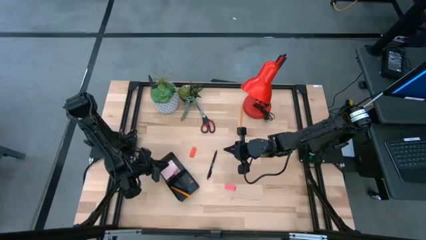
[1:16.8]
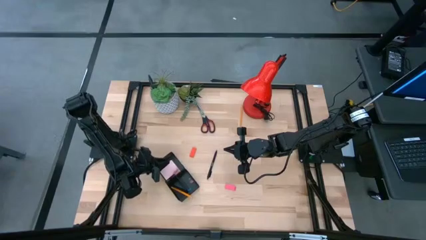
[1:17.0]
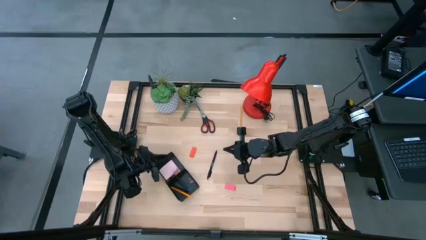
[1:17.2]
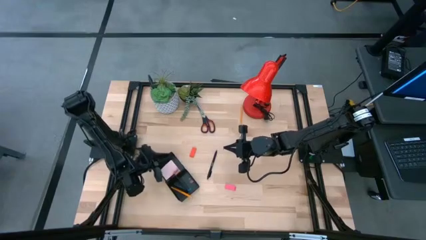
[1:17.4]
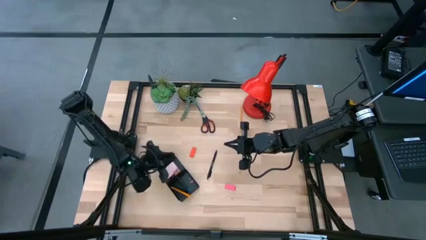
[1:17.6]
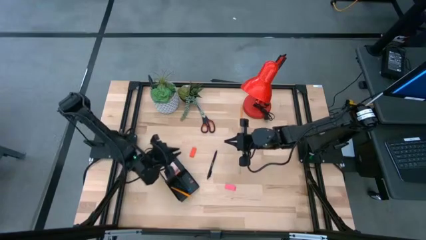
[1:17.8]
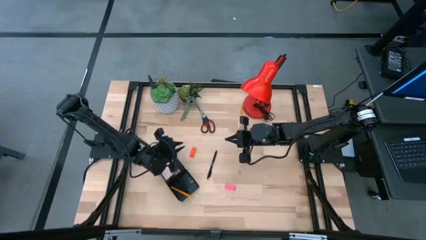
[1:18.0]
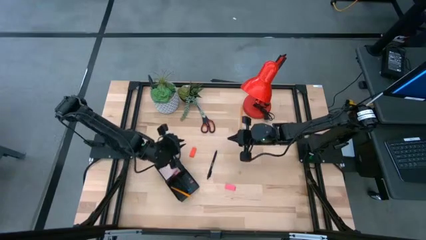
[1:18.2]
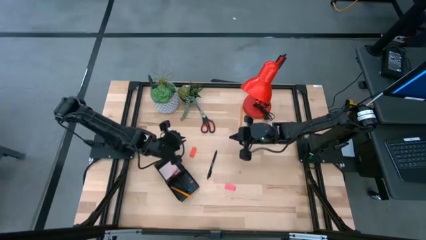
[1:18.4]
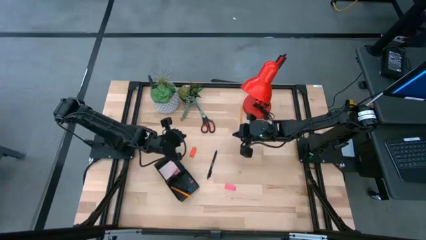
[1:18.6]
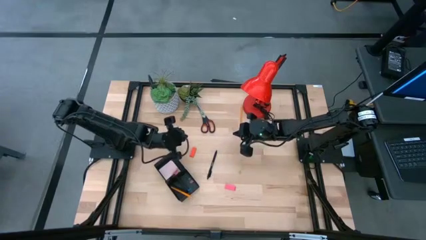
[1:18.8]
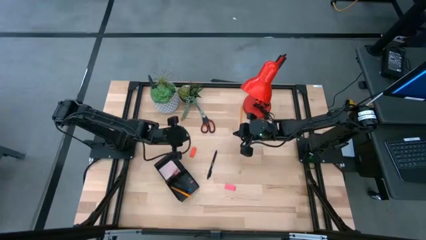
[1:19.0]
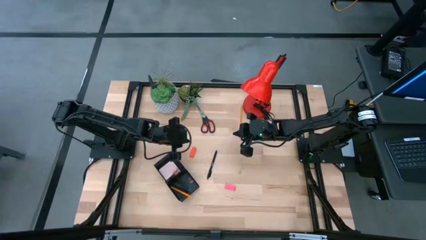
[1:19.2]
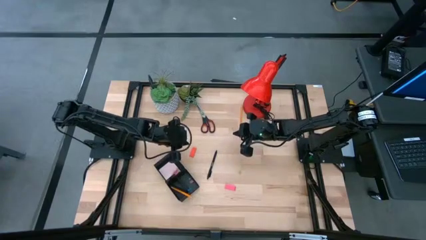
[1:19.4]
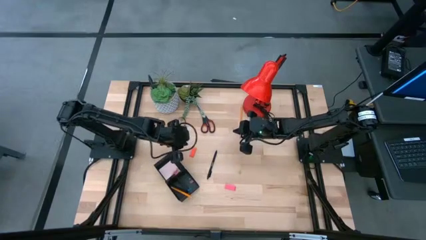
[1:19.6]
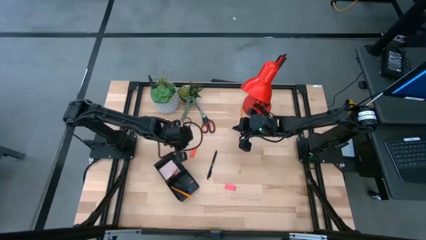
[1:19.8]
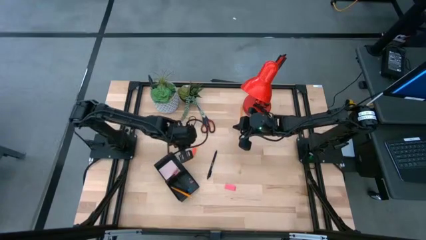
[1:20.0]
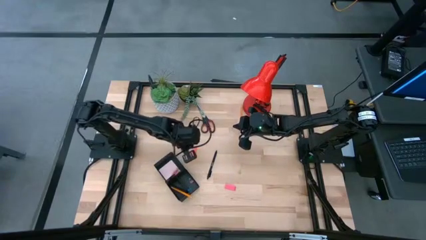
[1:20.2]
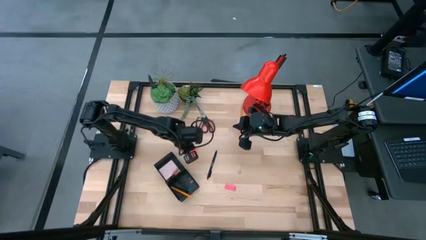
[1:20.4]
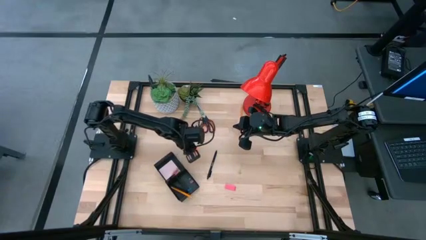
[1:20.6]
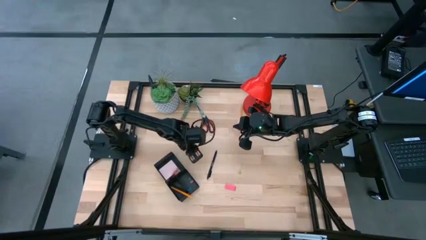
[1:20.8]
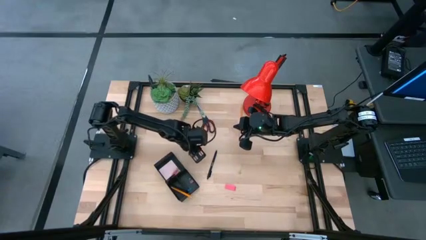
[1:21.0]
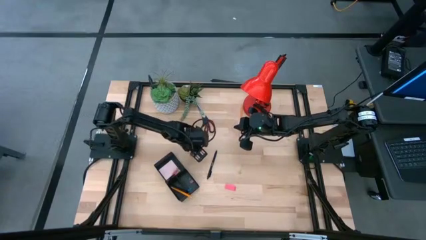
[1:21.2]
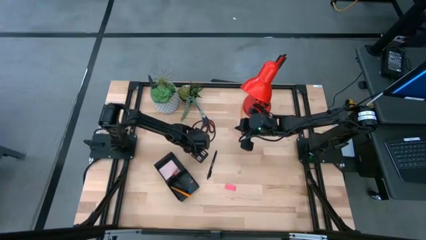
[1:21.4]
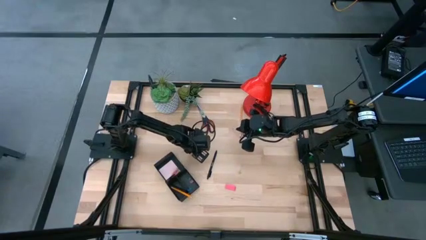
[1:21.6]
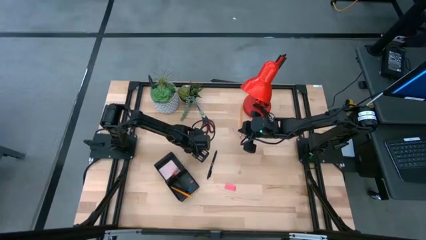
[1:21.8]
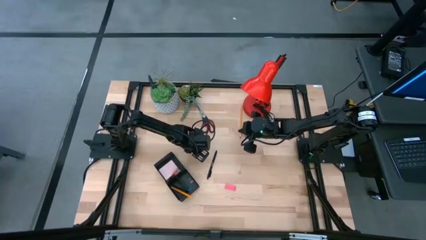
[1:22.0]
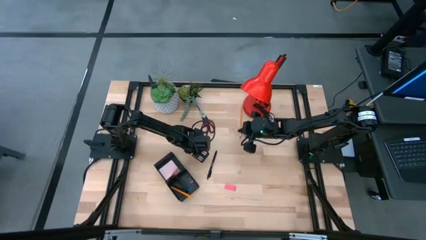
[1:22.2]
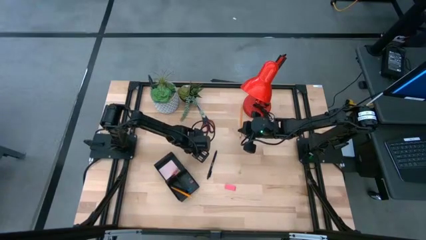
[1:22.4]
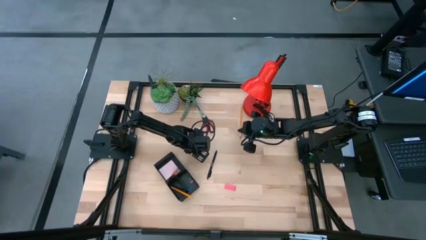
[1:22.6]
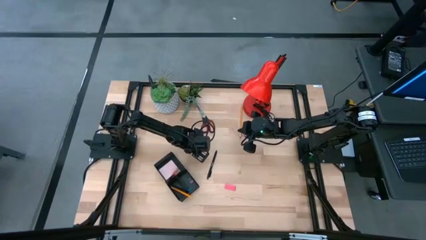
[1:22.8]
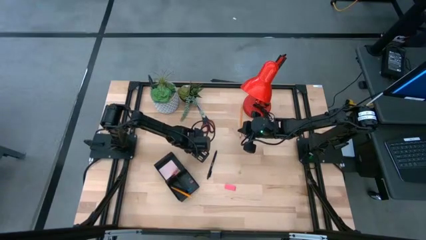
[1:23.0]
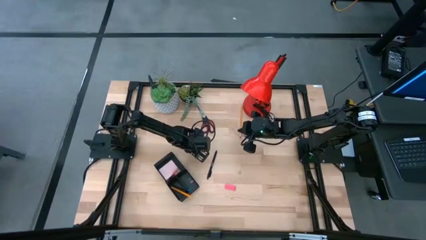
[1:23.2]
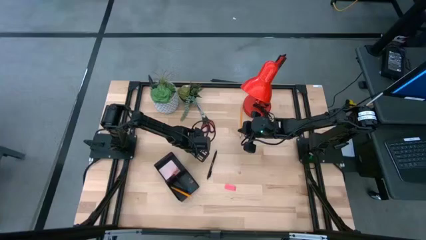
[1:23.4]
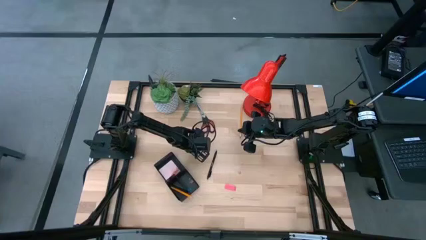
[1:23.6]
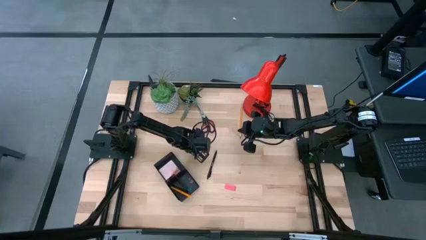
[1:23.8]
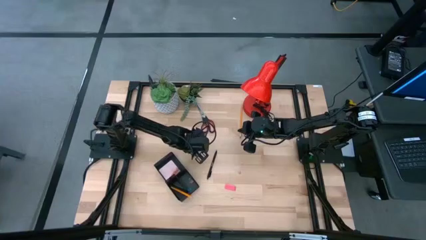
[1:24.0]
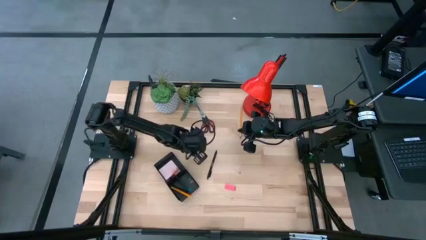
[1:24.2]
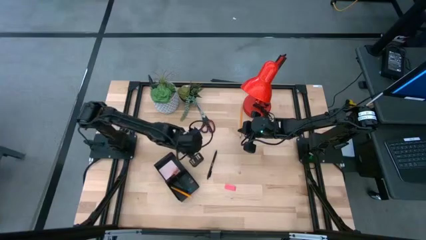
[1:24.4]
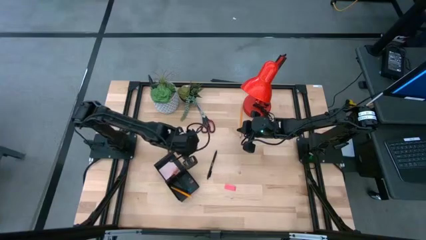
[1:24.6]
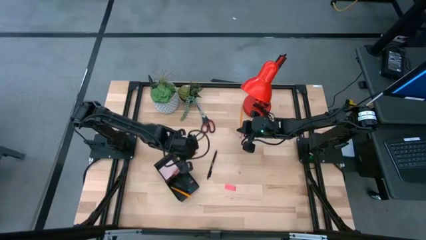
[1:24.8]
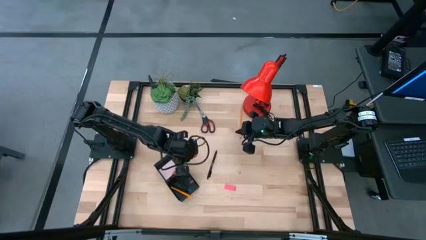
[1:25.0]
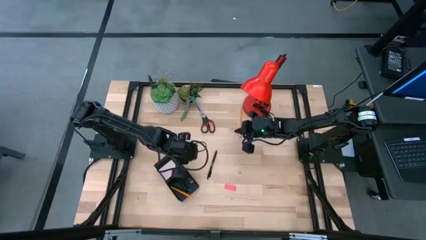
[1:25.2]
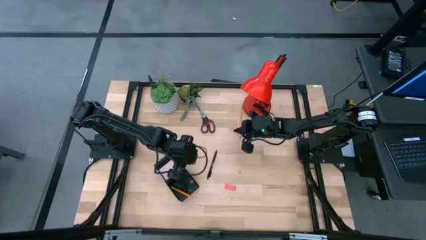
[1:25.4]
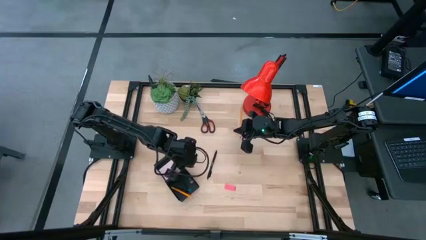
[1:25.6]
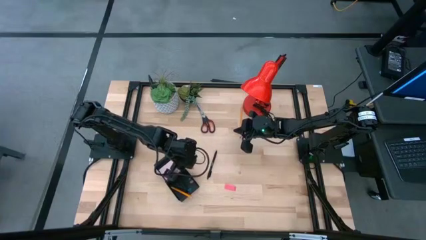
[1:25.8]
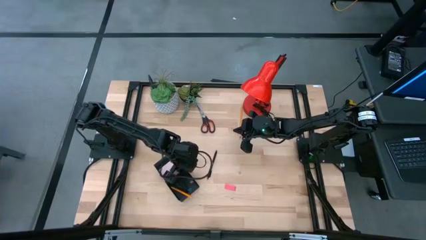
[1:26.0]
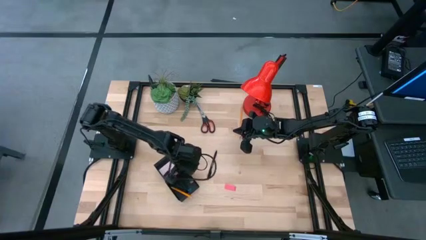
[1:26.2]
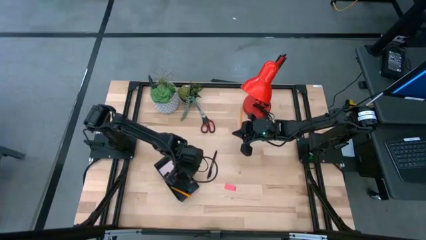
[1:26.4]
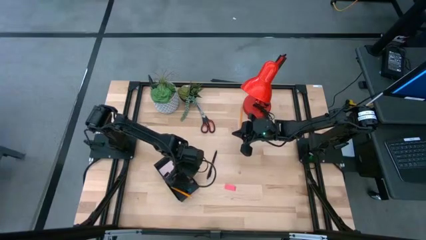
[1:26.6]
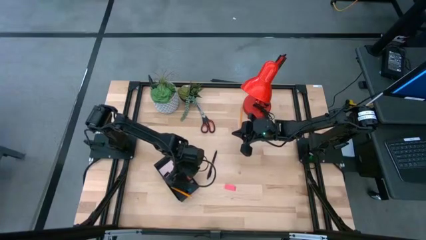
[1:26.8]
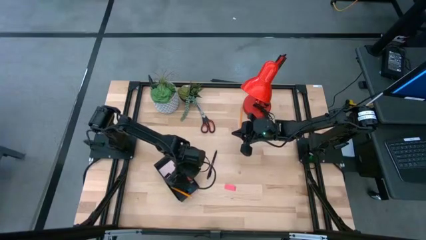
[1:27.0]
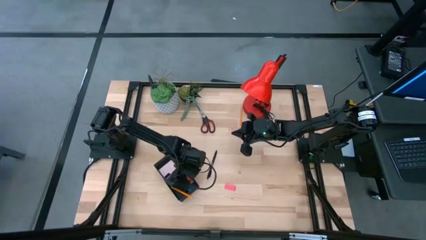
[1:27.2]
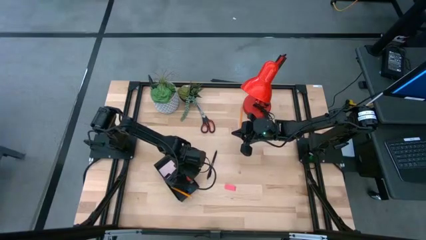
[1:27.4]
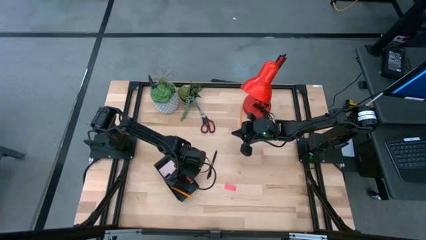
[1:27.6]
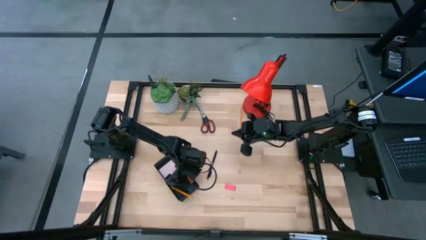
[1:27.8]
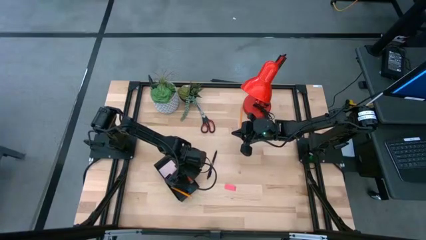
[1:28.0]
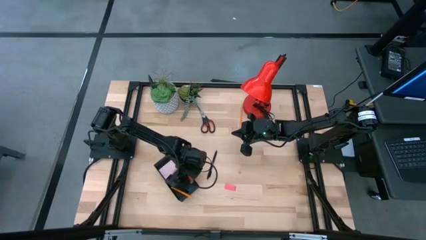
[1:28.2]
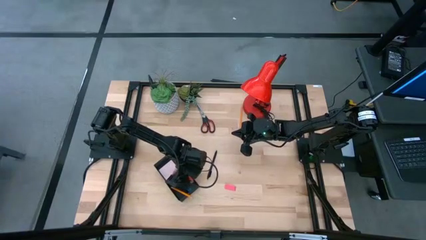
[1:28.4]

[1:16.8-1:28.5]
Task: Pick and place office supplies into organizer
Put the orange eraser into the black desk organizer
